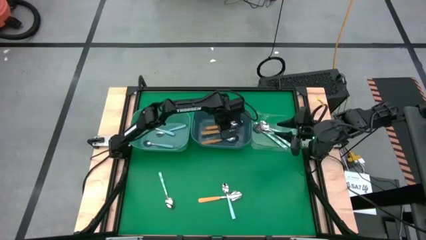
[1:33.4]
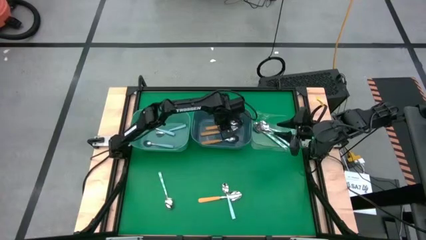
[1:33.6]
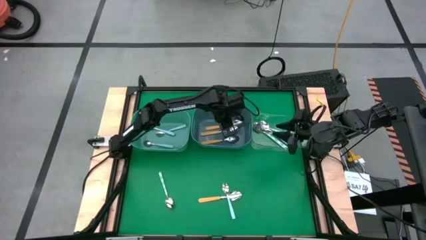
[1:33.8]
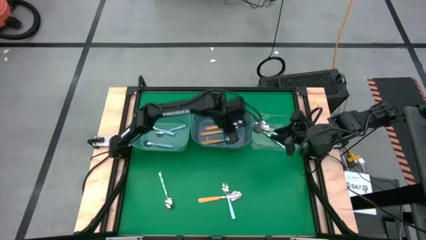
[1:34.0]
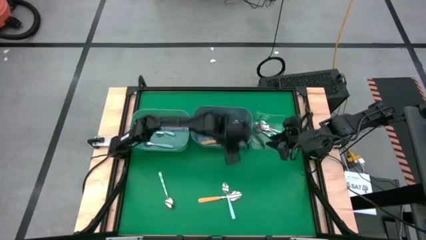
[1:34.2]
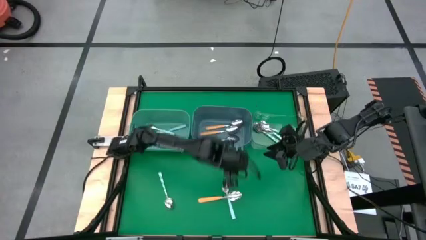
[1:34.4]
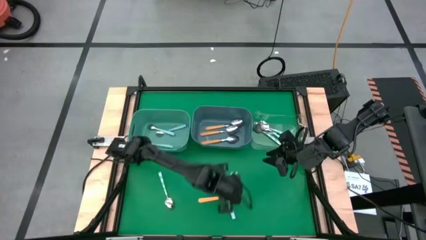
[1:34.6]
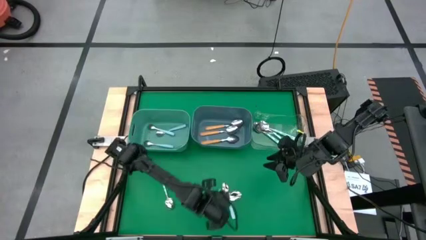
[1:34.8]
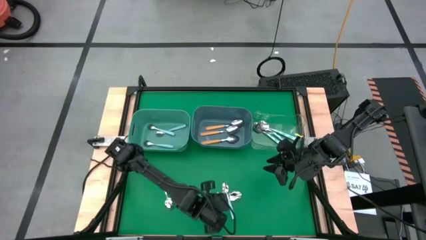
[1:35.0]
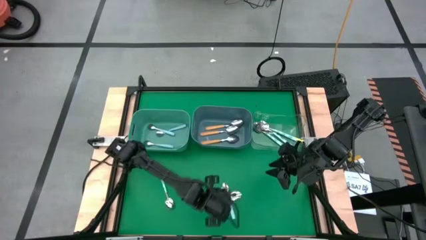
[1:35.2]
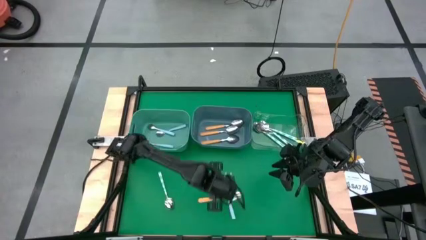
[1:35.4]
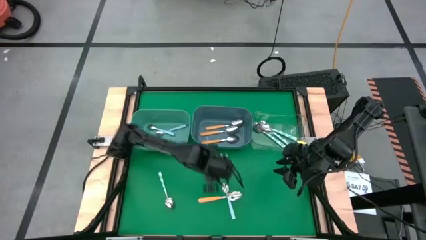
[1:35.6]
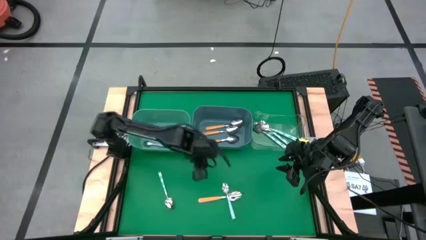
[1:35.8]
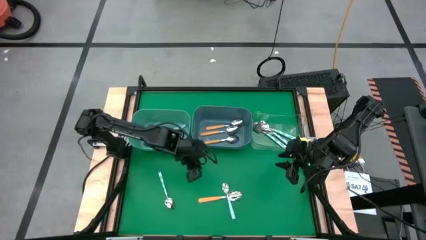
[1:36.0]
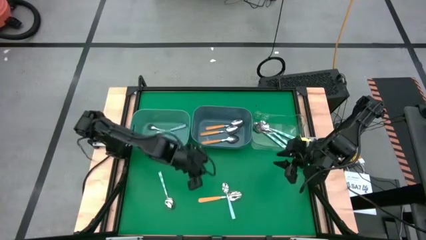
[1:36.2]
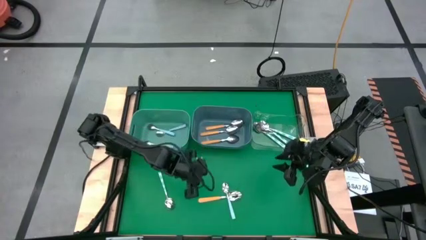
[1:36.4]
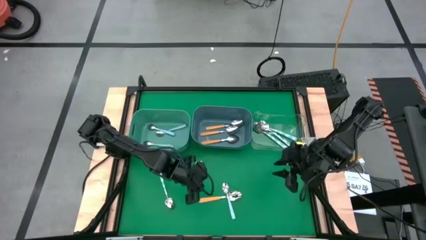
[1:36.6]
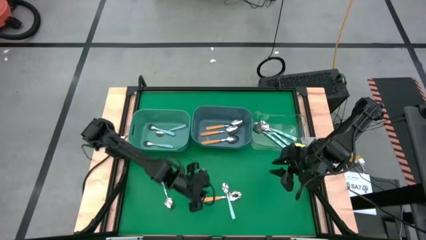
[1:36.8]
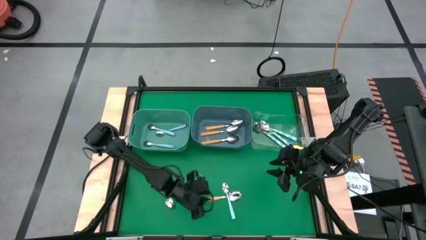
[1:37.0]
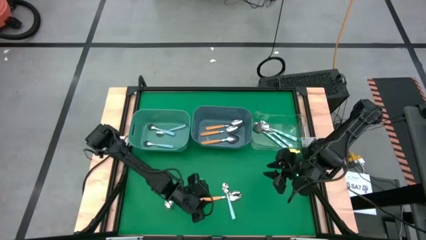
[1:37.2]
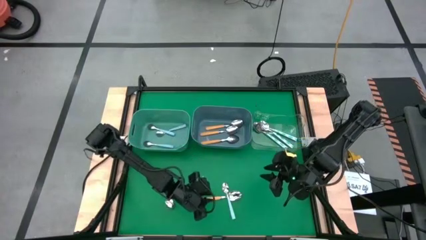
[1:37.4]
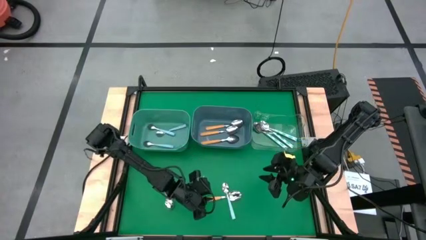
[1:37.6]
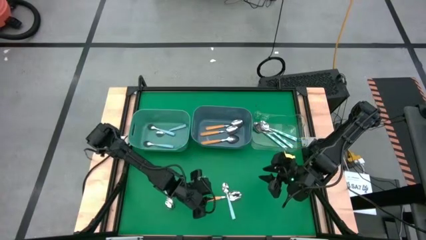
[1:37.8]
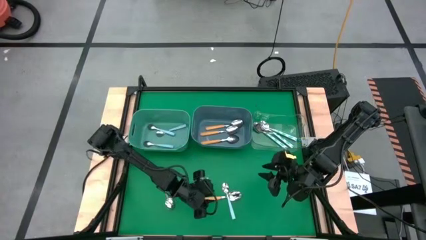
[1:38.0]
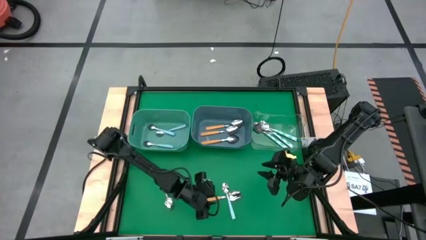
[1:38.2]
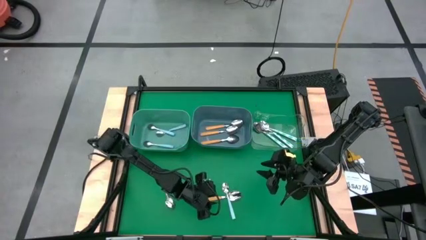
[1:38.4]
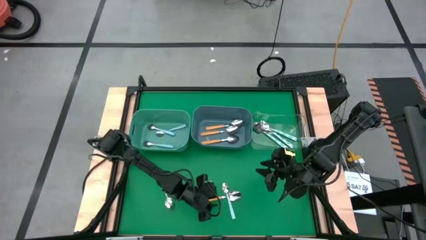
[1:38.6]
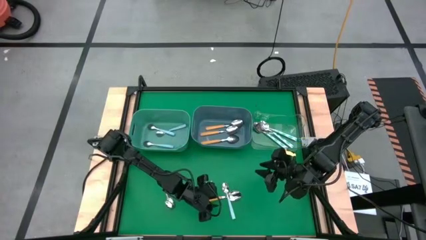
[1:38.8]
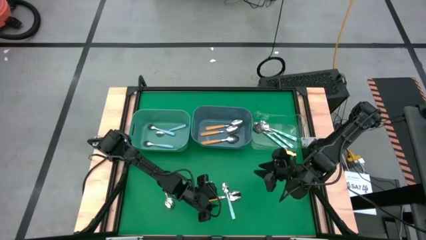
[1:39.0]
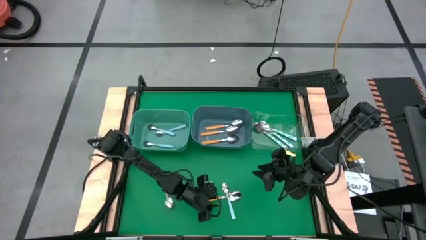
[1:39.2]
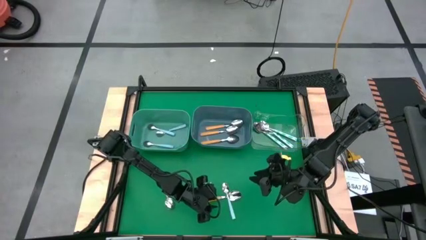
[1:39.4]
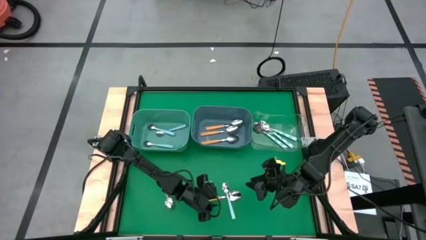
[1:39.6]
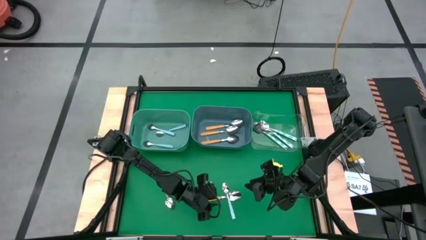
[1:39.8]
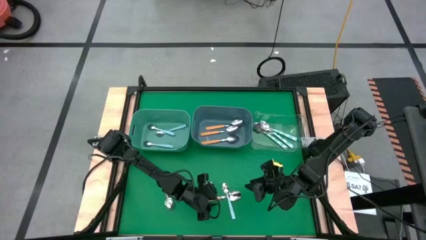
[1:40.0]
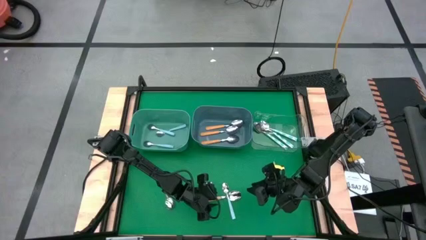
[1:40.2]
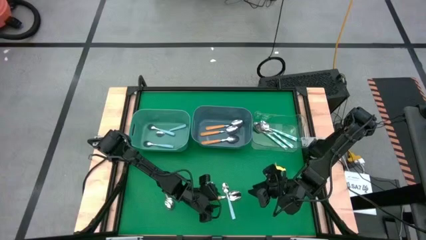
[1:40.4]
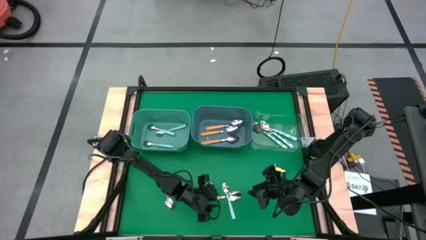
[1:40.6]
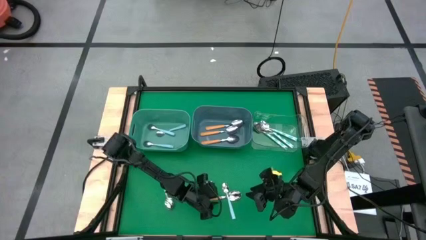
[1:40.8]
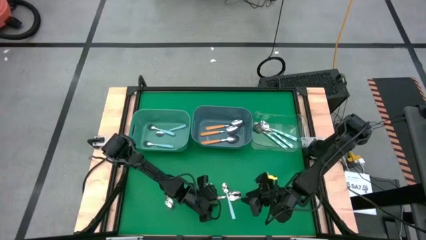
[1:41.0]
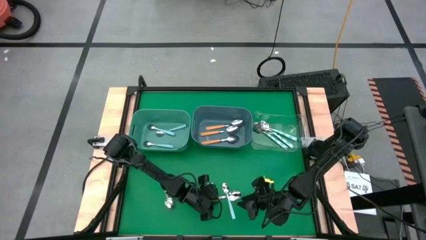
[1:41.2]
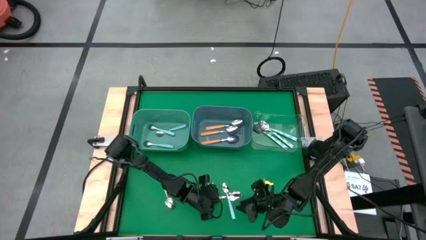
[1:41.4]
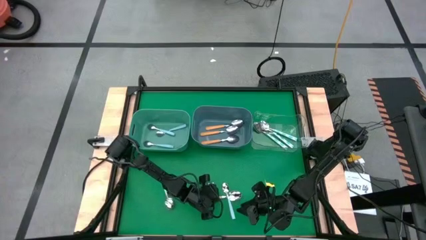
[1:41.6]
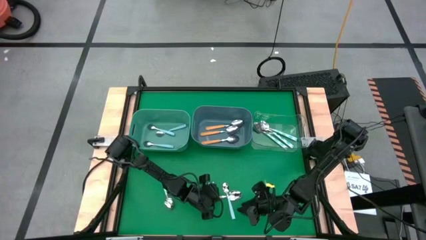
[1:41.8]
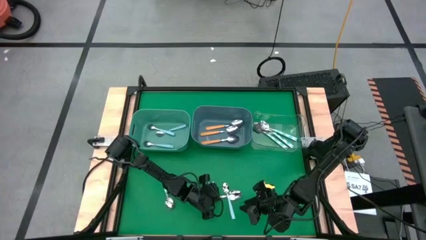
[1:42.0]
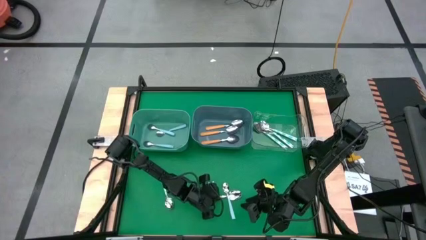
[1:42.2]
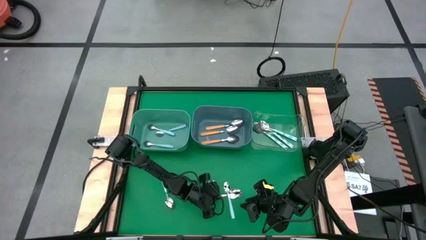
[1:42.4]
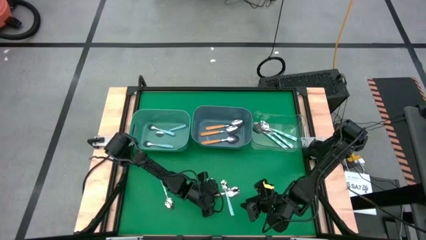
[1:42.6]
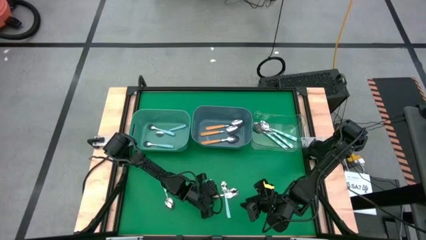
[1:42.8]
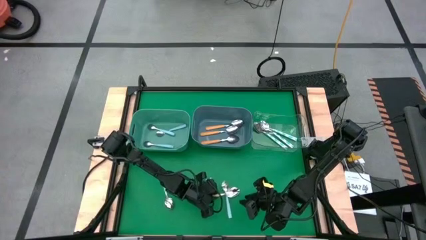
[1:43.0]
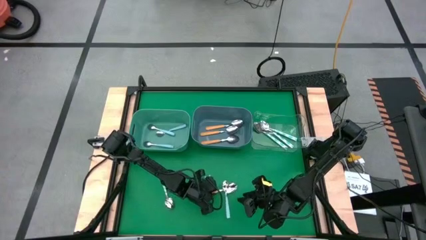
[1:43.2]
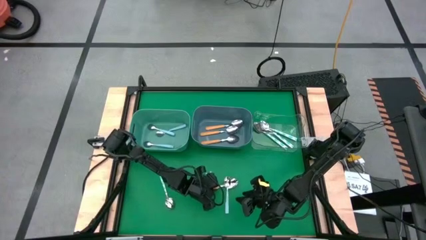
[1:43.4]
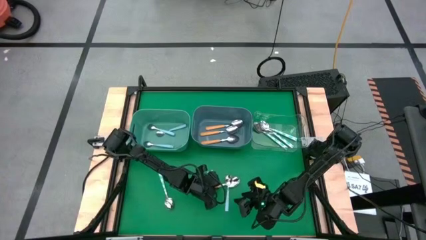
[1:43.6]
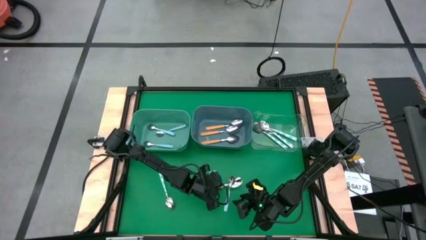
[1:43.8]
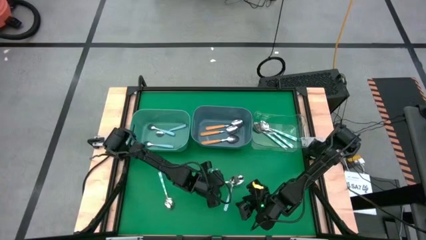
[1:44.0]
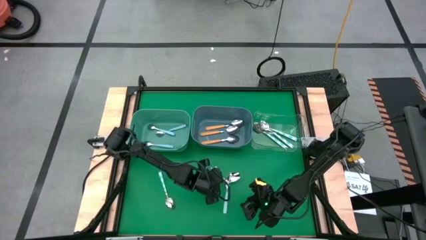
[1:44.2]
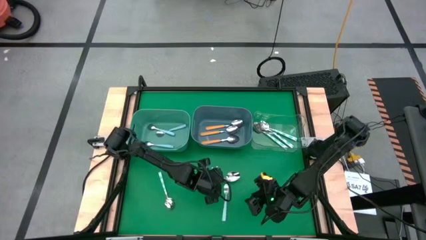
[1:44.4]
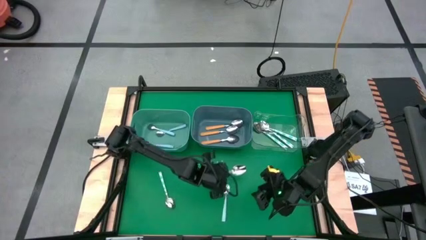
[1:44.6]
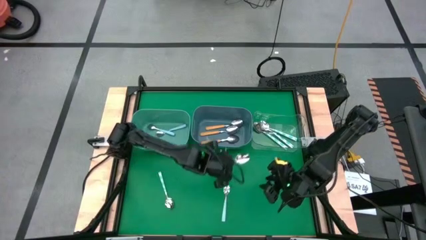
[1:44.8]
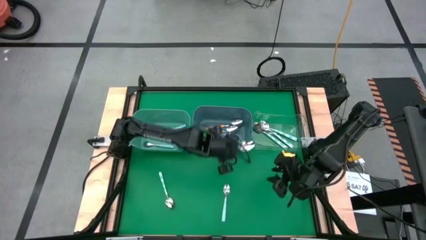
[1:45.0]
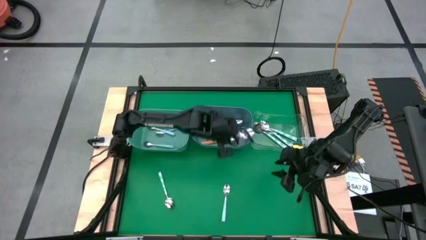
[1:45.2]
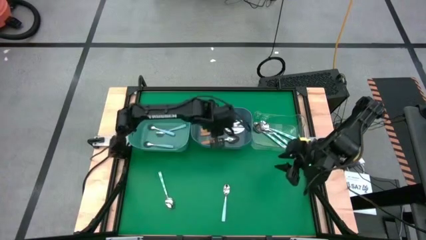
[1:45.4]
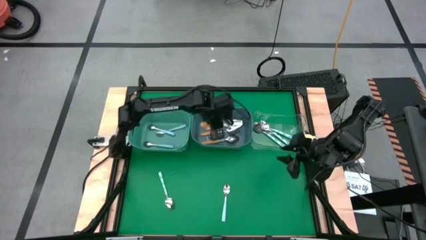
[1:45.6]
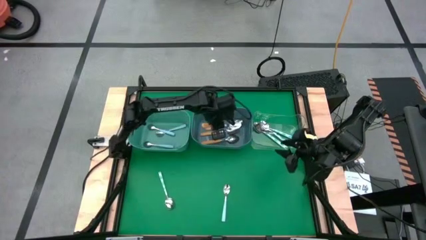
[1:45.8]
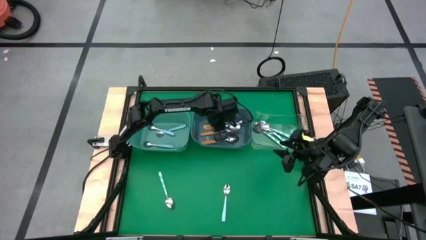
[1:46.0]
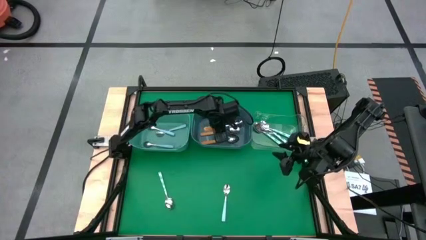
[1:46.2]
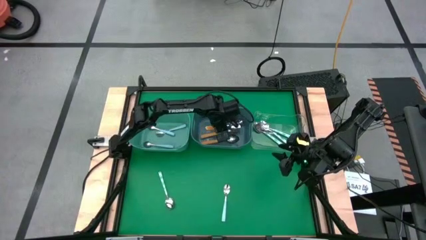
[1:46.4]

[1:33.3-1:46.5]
Task: Sort silverware by color (type)
Put the orange spoon into the blue bin

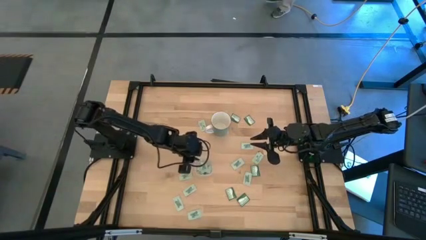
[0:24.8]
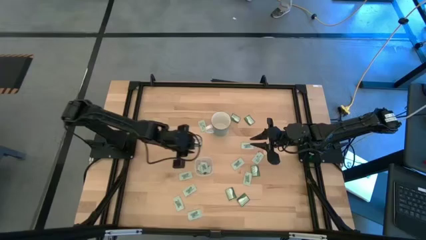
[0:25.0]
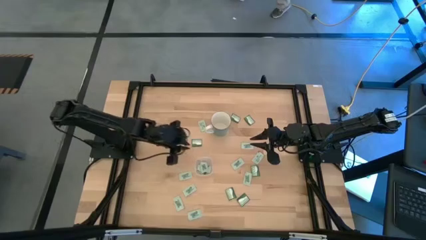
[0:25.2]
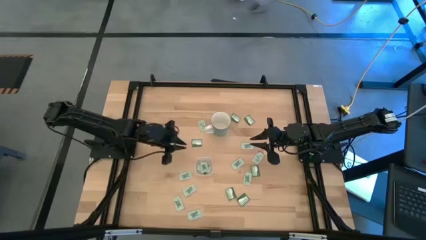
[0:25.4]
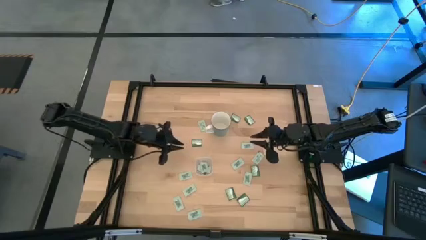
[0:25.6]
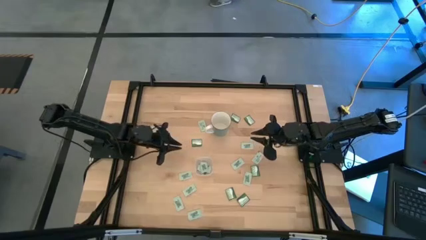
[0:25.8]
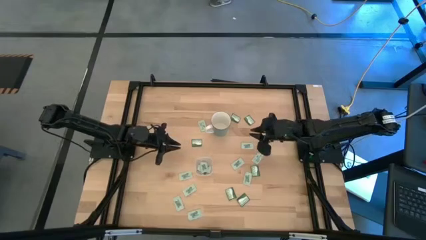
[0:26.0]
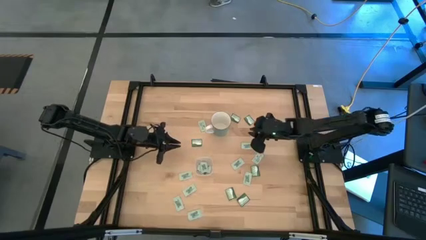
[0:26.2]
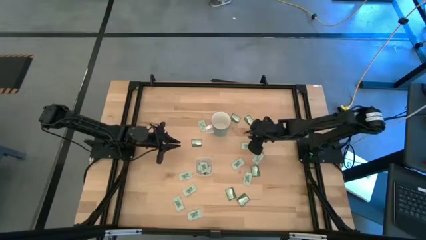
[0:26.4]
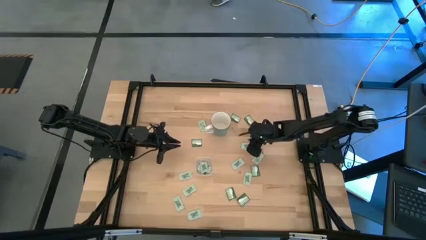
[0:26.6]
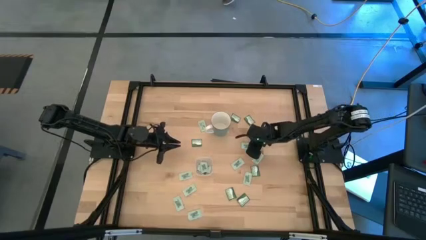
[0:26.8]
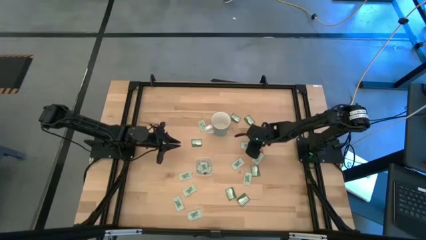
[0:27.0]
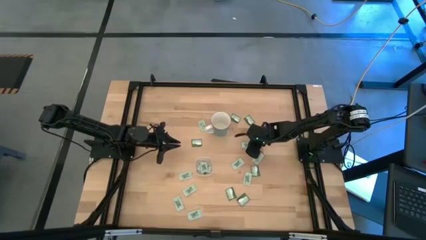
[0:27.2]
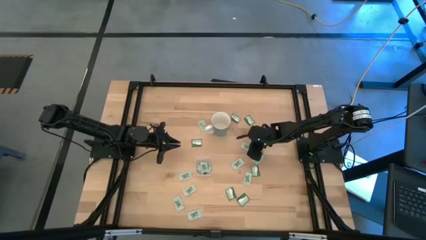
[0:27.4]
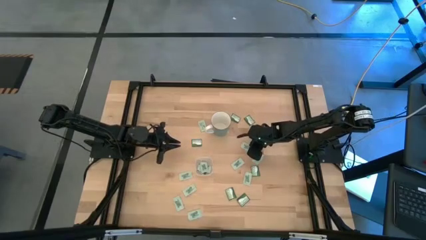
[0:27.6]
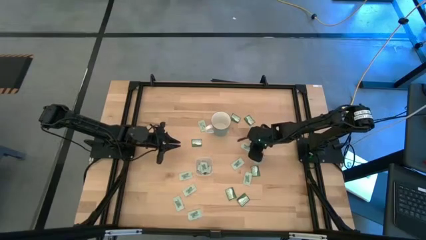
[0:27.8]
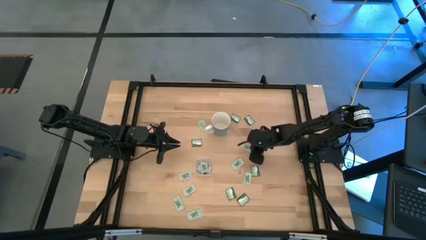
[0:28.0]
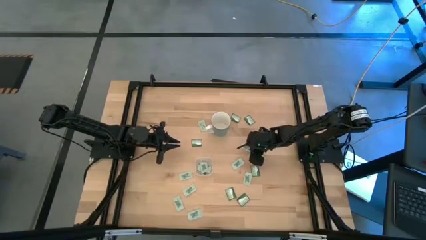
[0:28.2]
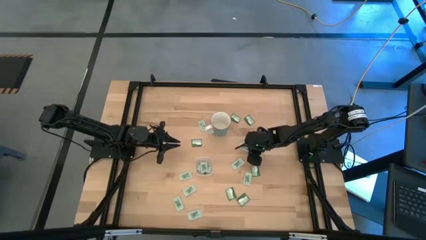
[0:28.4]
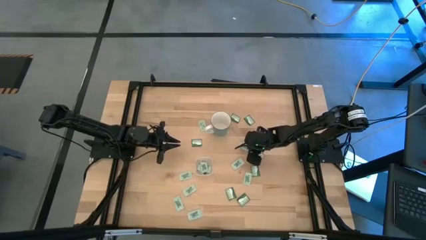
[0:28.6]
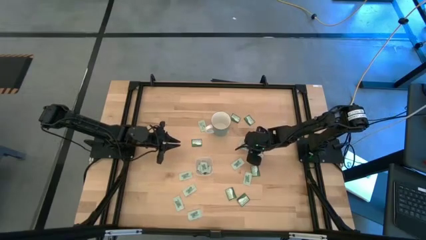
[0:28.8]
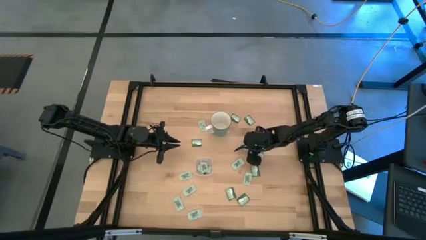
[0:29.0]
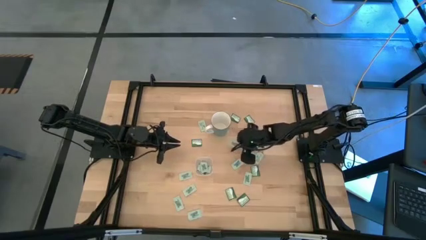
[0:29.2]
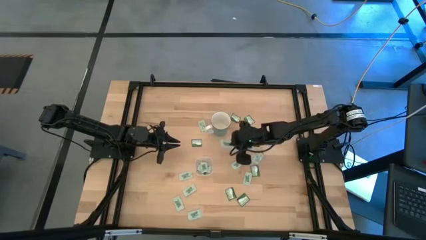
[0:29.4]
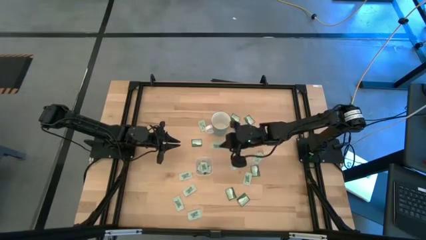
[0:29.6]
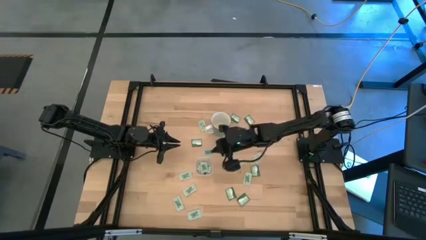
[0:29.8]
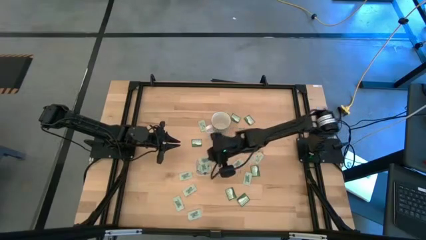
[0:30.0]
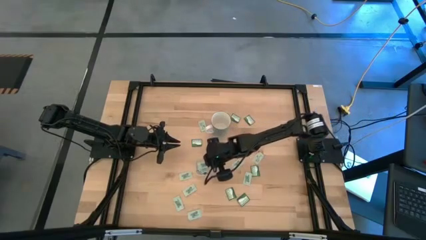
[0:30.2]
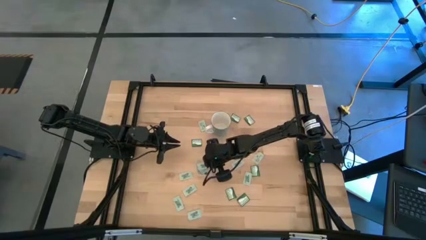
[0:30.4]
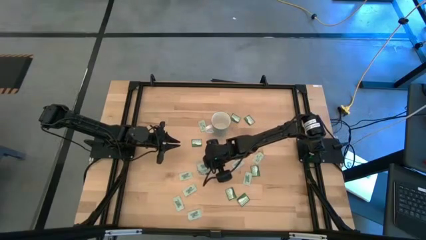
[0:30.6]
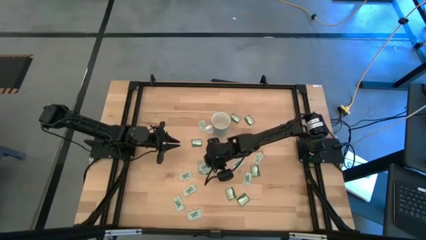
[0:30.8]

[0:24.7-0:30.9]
Task: Pick and place Stevia / Truvia into bins
Put the white stevia packet into the transparent bin
